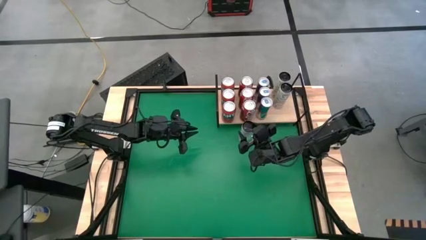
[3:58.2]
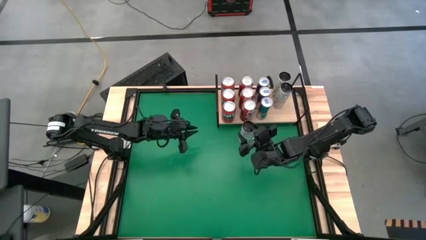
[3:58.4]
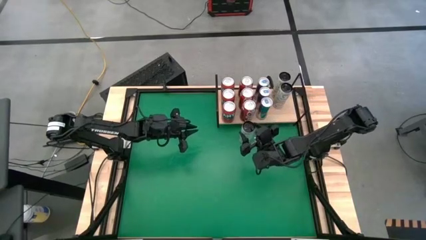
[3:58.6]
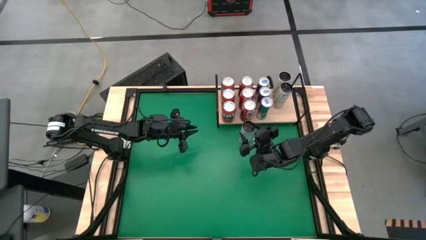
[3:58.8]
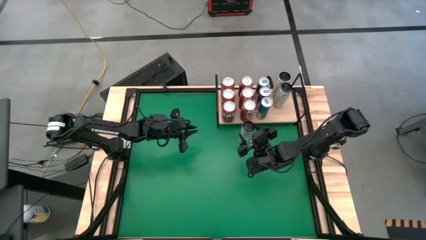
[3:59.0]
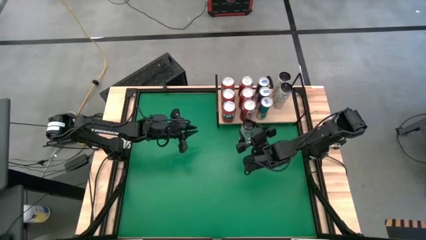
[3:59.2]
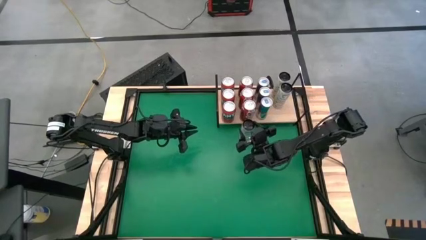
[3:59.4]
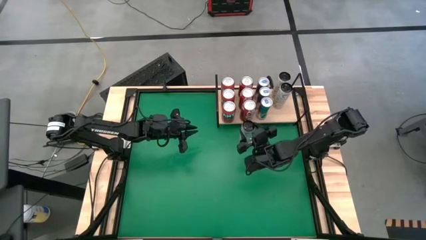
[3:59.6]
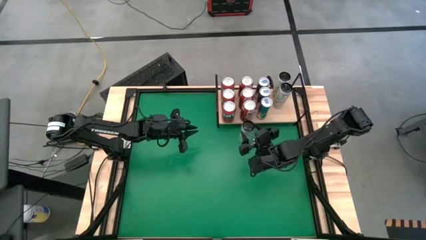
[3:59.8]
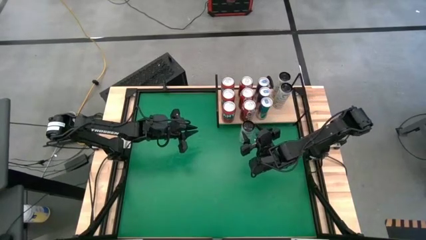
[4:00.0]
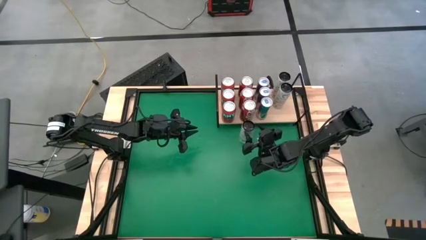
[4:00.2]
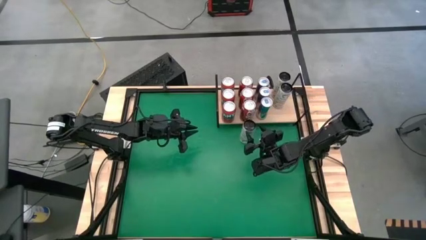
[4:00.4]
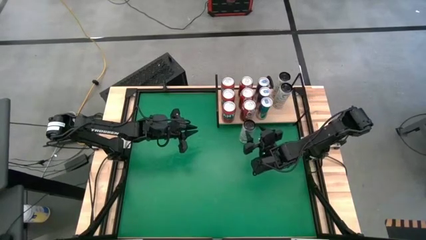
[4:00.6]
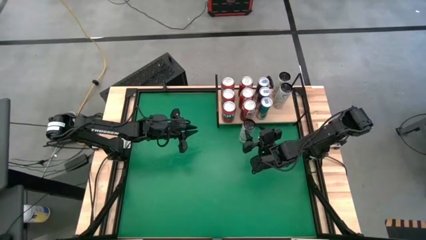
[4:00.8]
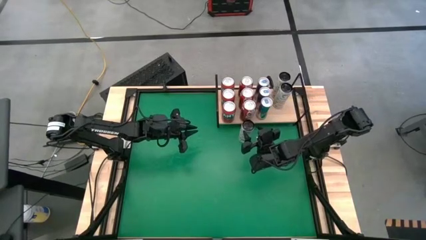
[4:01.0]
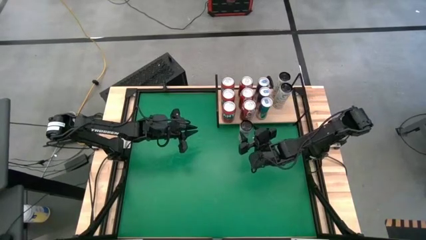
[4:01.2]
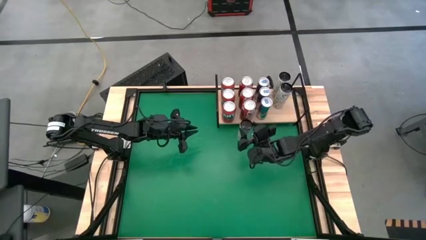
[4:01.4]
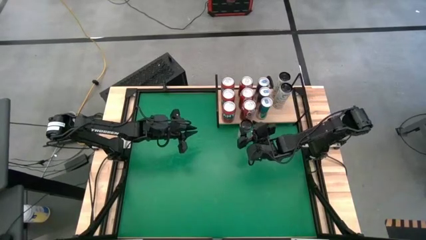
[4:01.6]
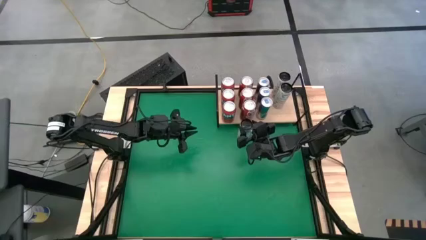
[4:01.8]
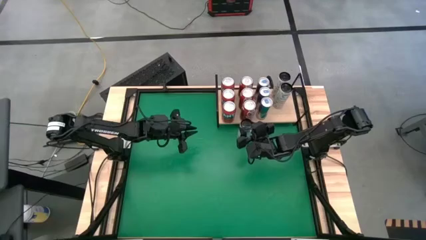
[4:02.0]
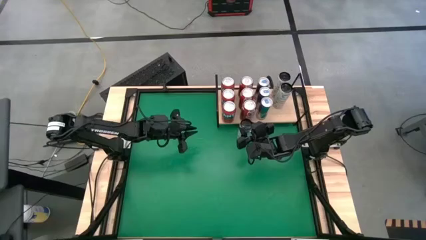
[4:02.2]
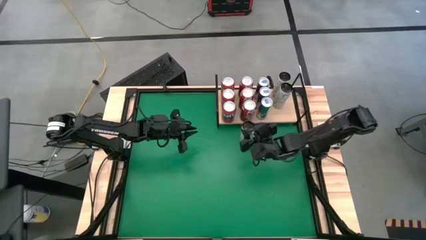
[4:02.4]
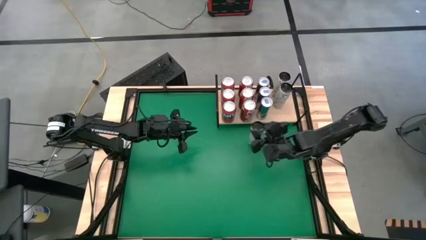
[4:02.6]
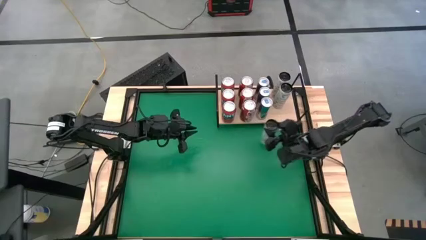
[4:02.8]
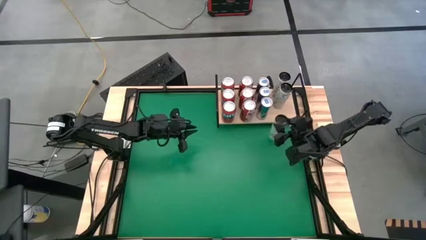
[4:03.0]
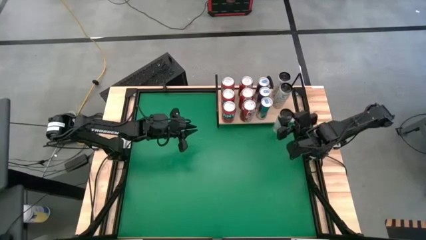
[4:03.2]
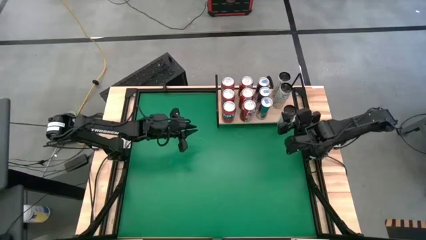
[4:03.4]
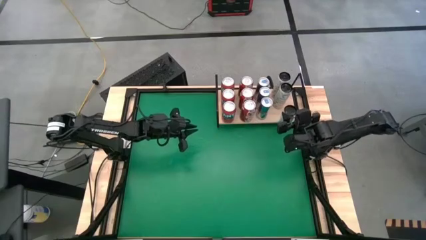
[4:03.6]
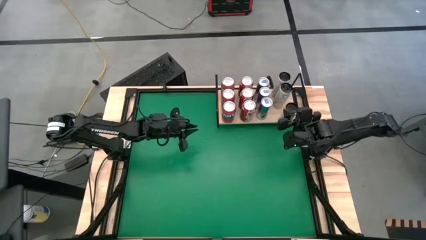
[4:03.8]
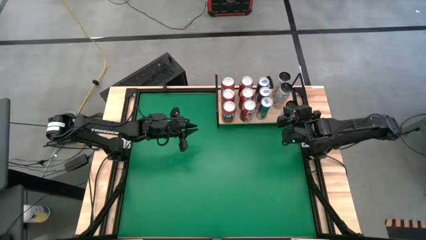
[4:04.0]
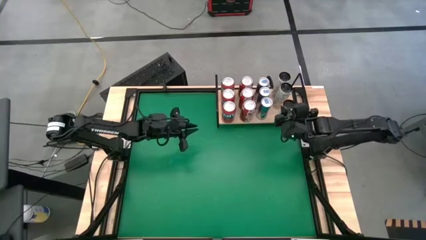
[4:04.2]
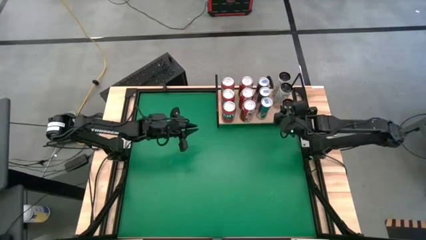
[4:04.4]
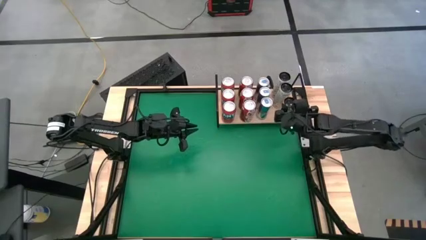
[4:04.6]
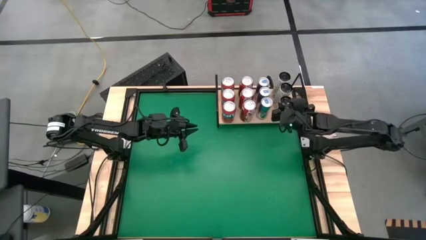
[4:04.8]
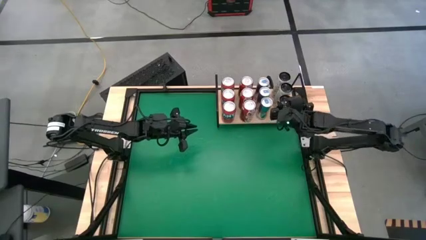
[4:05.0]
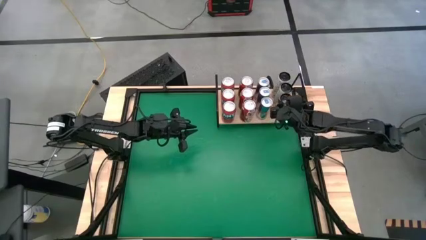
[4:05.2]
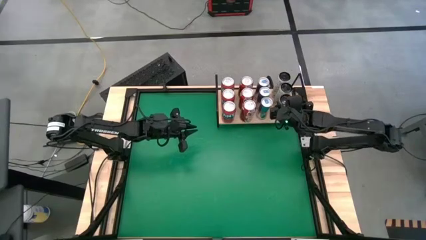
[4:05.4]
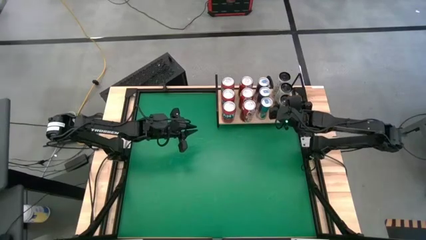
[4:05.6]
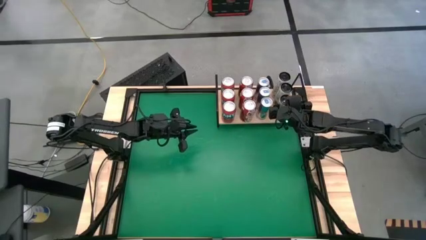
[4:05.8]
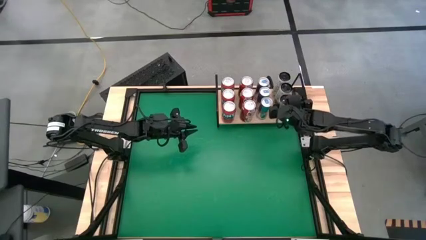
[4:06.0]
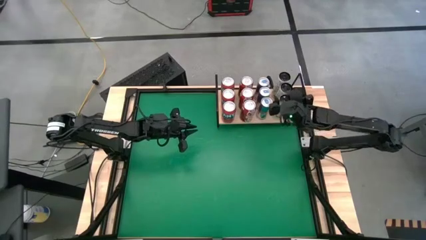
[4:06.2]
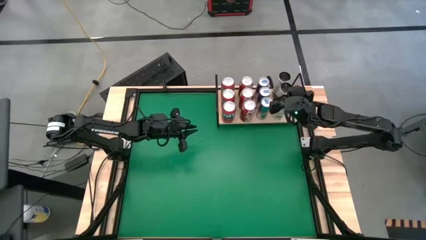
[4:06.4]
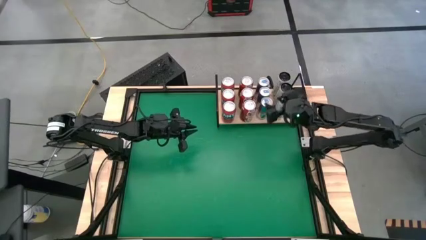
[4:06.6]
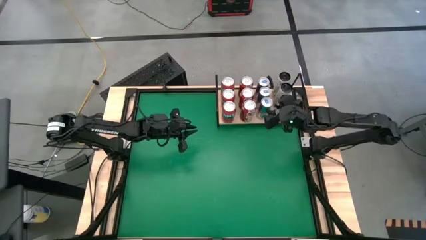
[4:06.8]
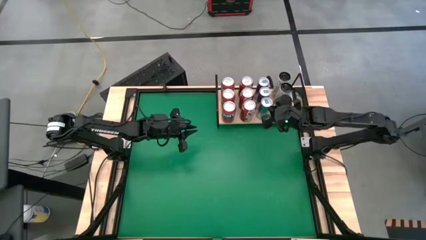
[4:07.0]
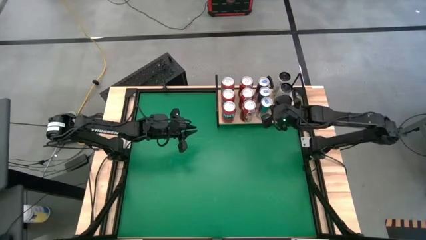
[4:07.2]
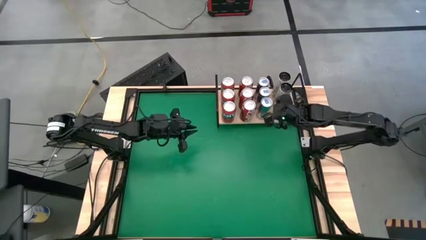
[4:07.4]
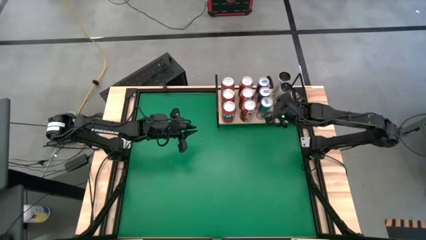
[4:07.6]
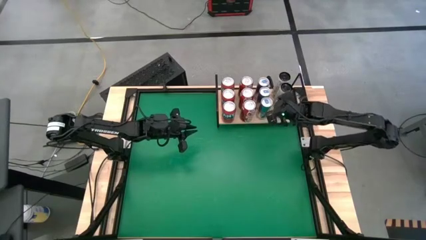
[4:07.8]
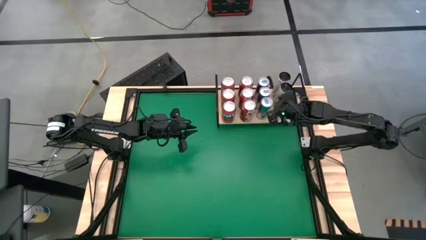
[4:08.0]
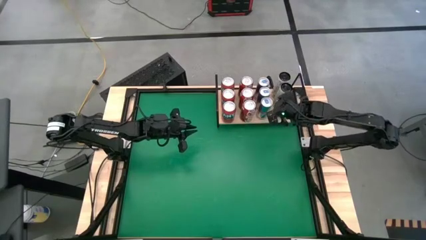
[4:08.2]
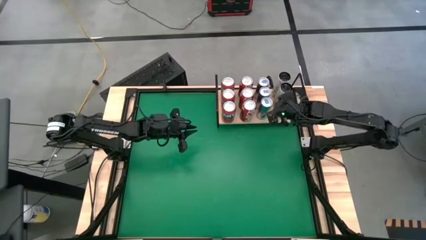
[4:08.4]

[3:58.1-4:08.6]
Task: Place canned beverage on shelf
Put the yellow soda can on the shelf aligned with the other yellow soda cans

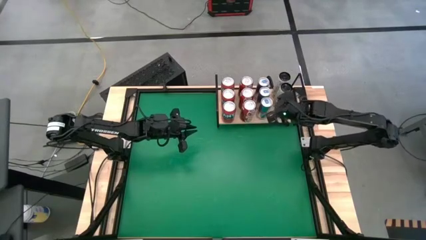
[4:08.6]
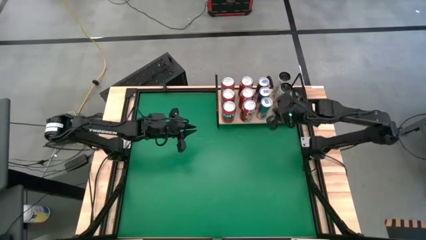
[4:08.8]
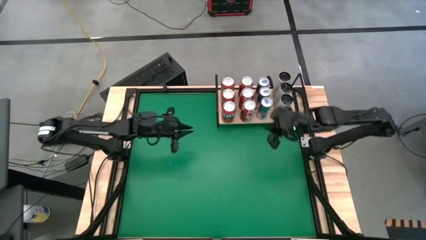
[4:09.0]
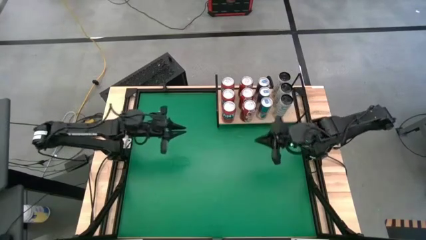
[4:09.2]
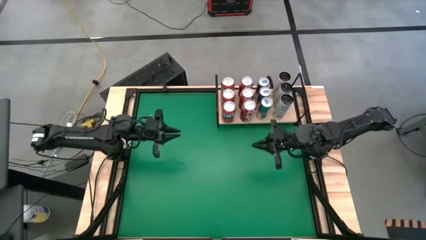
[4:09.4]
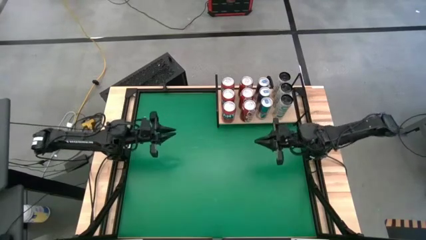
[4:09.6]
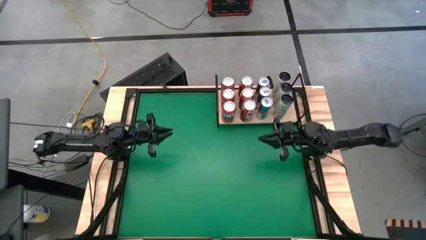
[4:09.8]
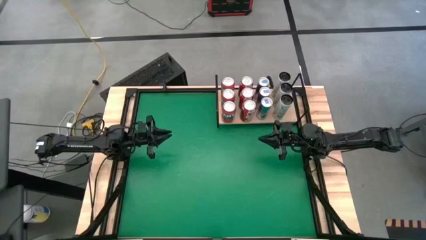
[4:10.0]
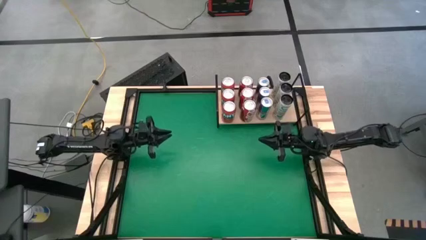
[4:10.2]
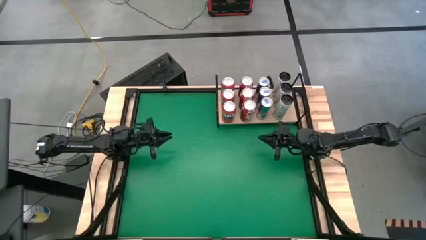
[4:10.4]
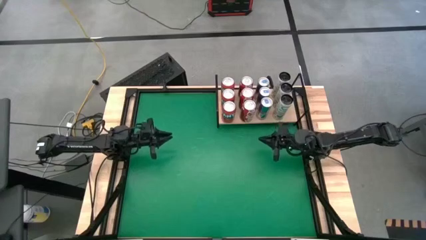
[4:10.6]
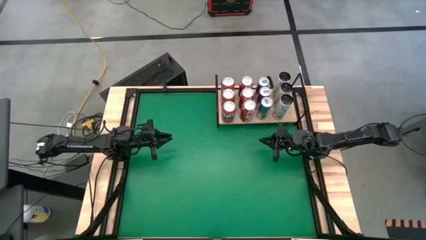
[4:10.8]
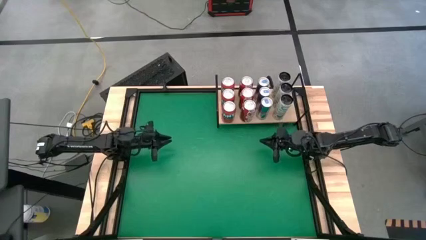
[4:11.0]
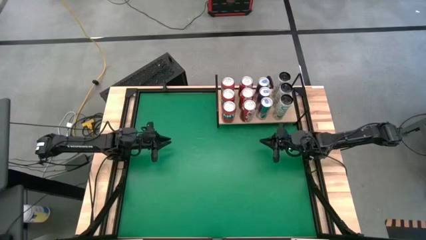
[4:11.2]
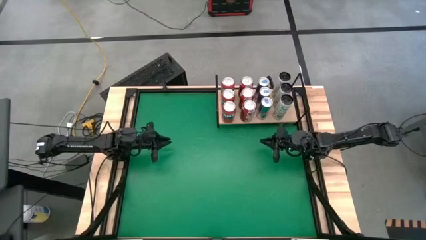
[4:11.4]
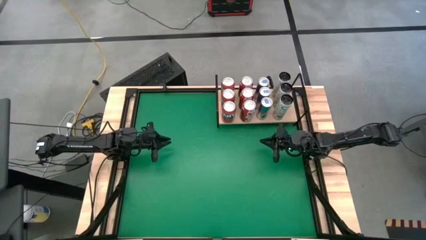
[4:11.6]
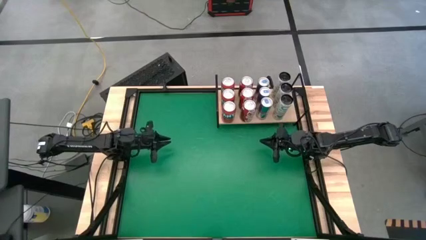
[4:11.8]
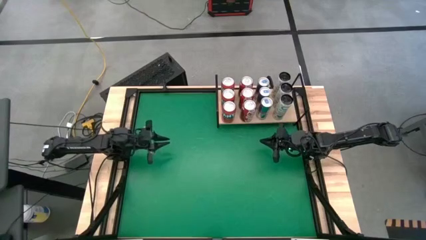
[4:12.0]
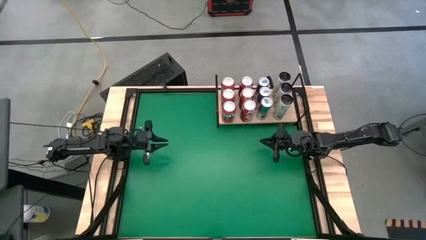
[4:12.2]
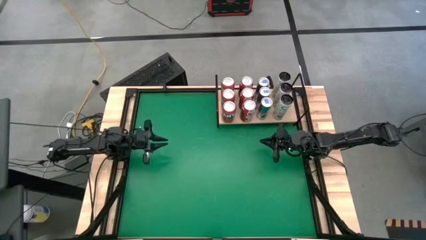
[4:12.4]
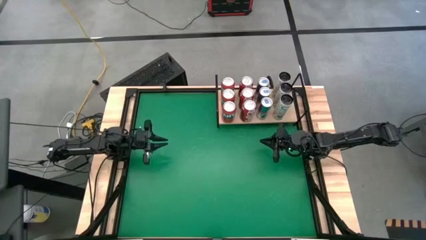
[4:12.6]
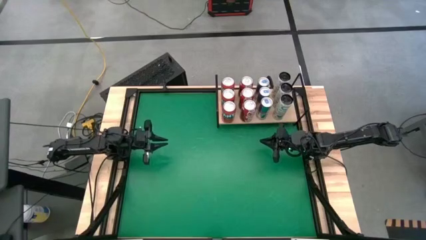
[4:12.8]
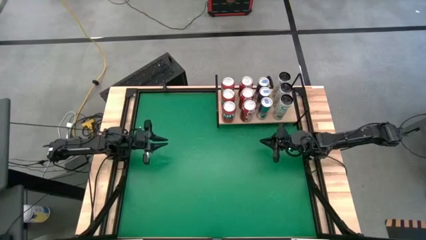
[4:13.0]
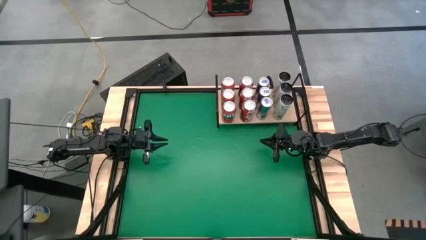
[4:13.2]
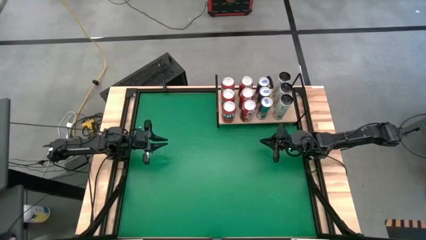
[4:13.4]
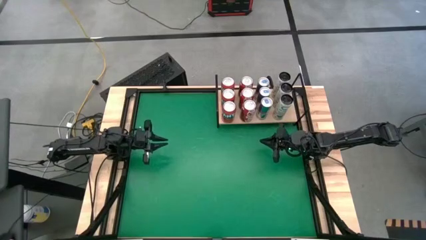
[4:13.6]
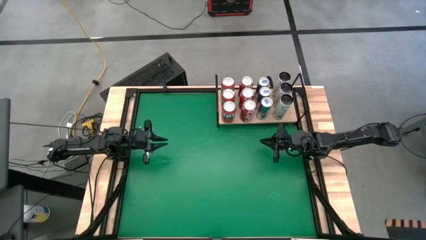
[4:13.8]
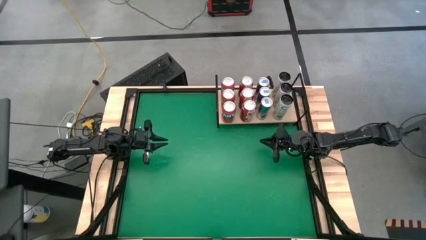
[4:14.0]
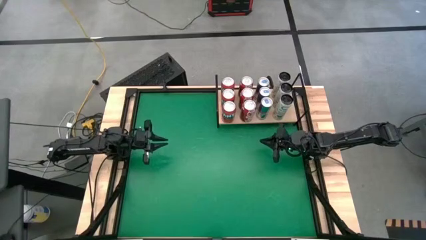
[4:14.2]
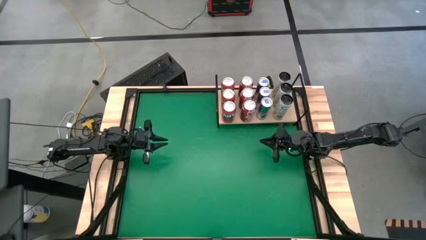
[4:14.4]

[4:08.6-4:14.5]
Return to Home Position
